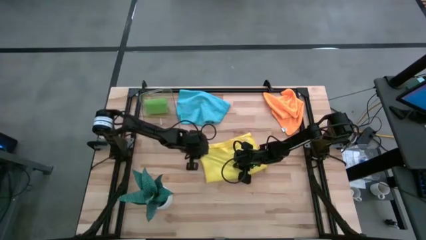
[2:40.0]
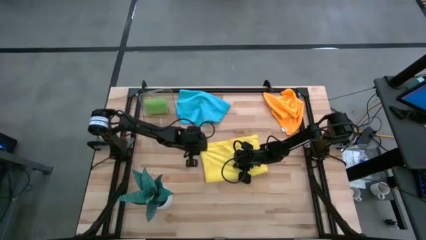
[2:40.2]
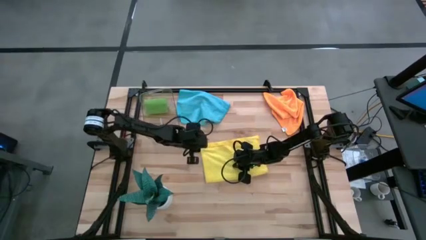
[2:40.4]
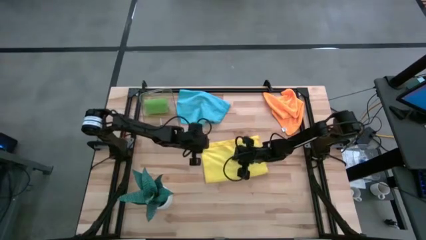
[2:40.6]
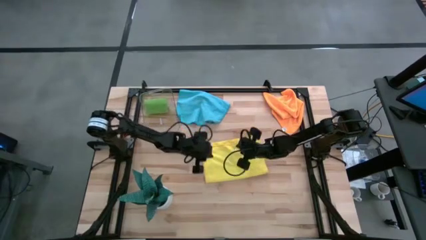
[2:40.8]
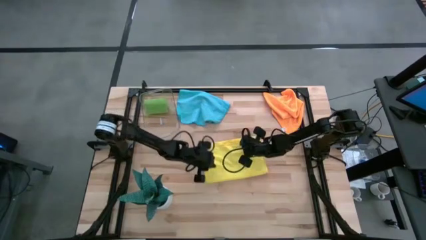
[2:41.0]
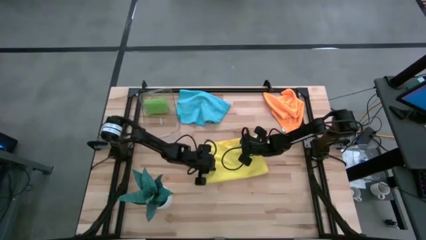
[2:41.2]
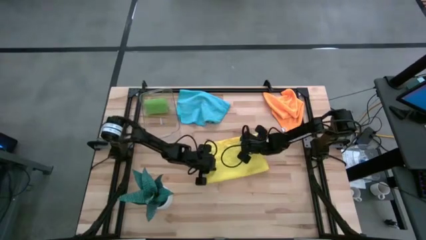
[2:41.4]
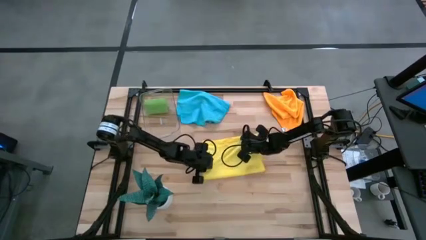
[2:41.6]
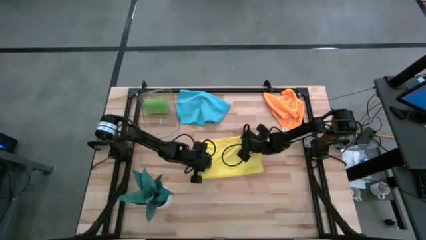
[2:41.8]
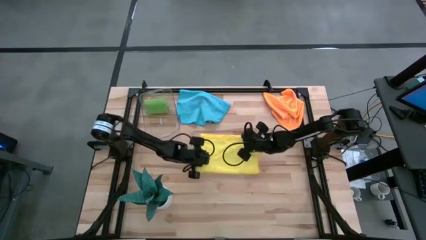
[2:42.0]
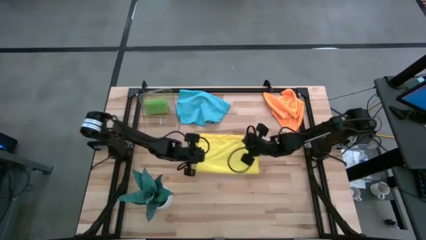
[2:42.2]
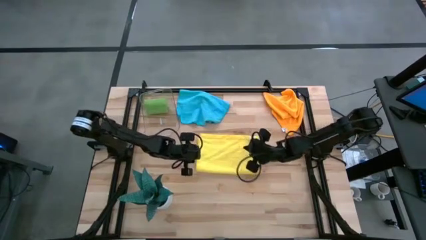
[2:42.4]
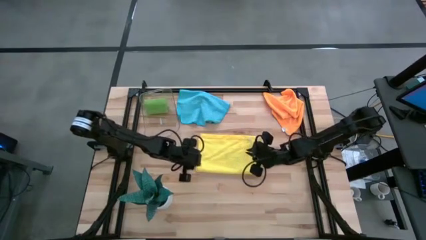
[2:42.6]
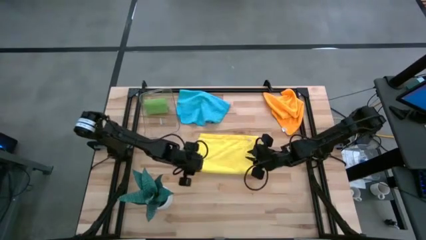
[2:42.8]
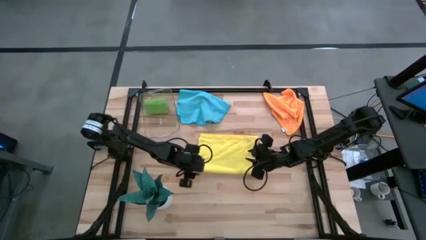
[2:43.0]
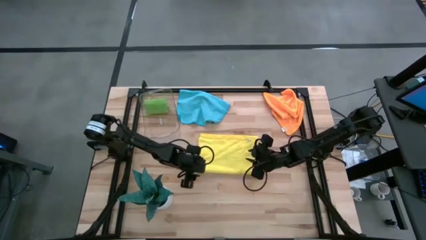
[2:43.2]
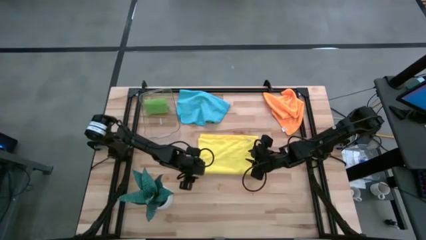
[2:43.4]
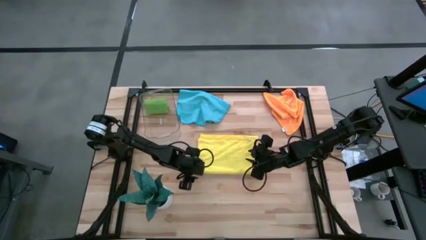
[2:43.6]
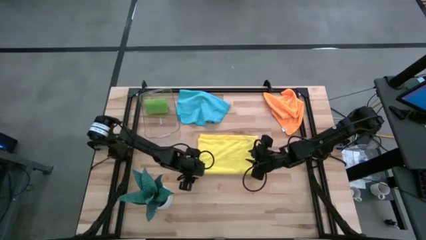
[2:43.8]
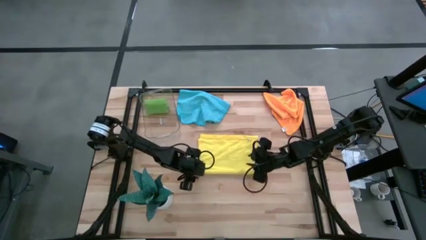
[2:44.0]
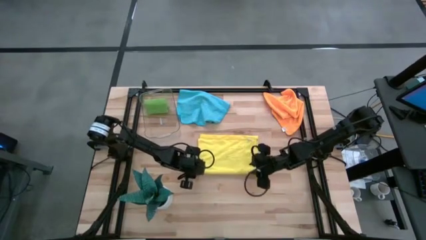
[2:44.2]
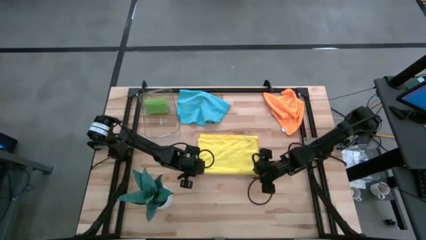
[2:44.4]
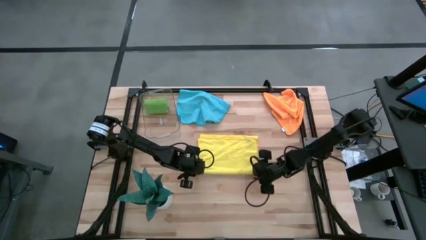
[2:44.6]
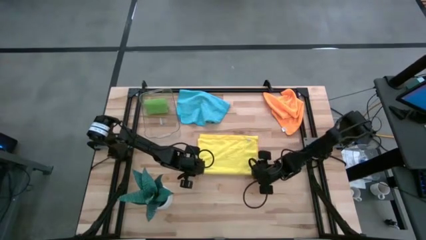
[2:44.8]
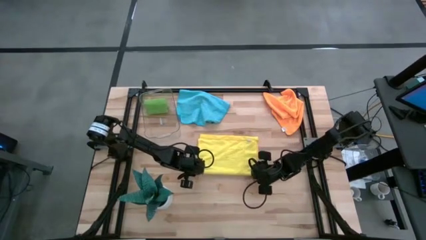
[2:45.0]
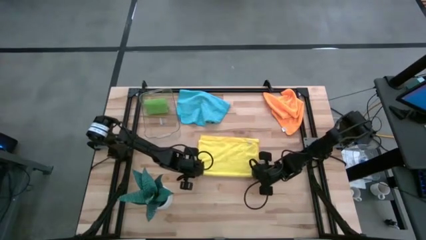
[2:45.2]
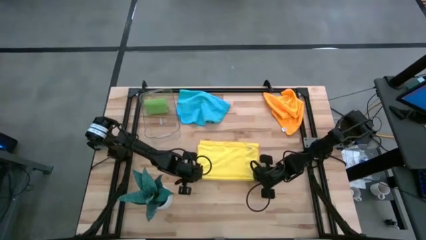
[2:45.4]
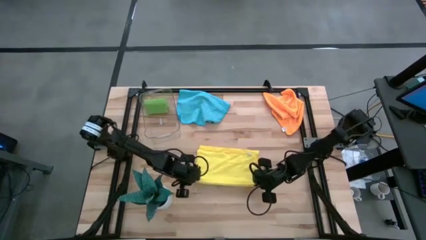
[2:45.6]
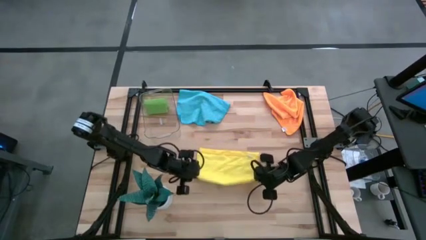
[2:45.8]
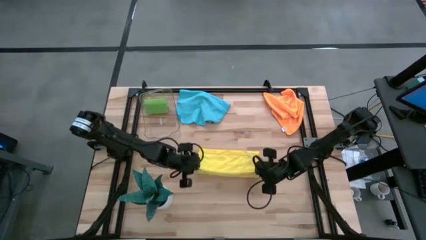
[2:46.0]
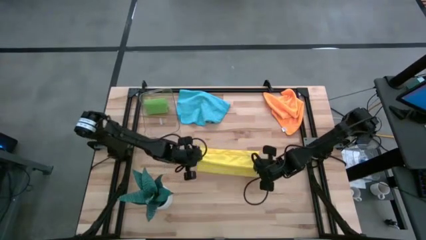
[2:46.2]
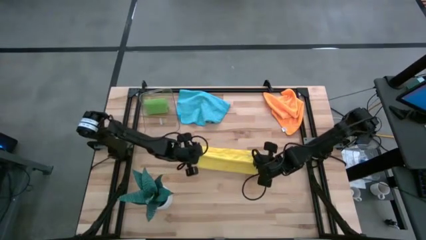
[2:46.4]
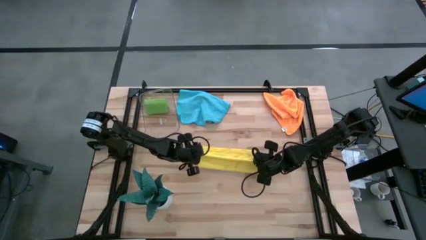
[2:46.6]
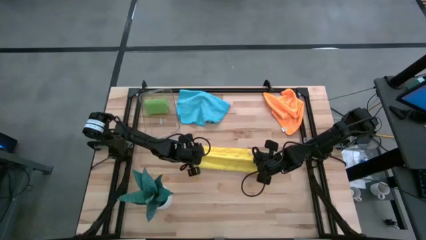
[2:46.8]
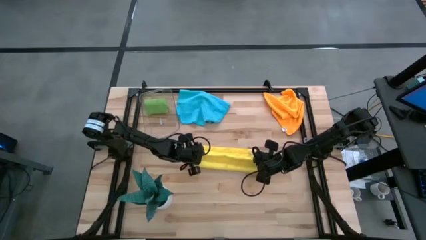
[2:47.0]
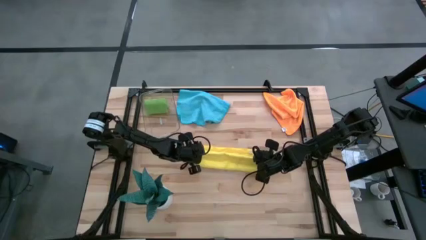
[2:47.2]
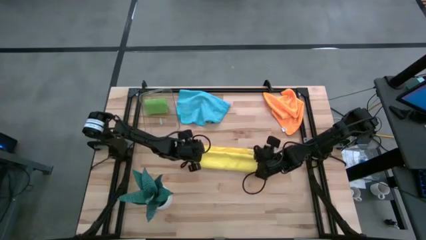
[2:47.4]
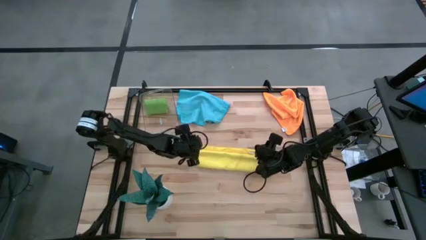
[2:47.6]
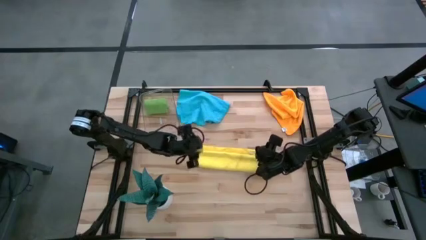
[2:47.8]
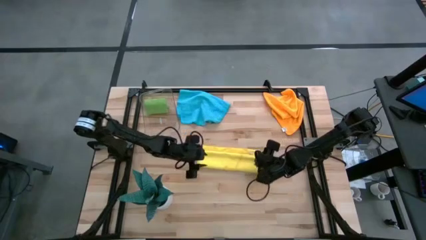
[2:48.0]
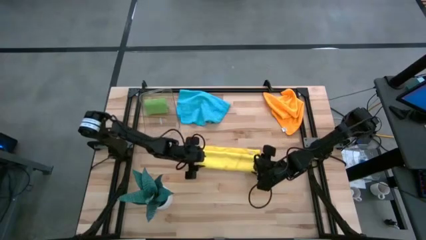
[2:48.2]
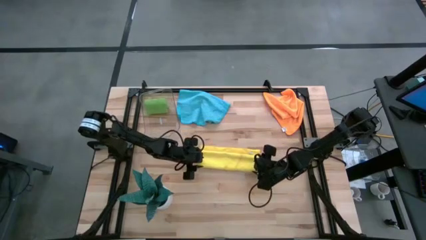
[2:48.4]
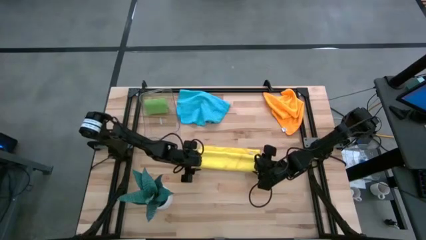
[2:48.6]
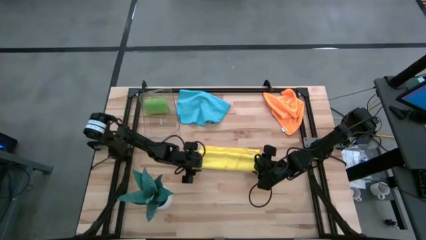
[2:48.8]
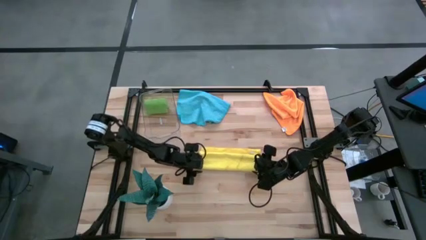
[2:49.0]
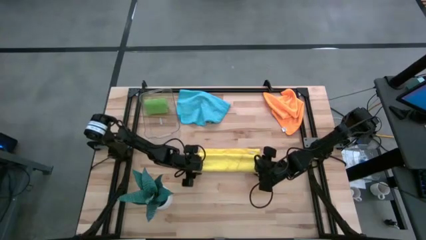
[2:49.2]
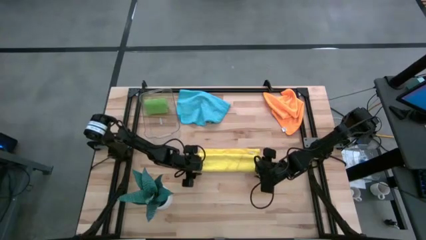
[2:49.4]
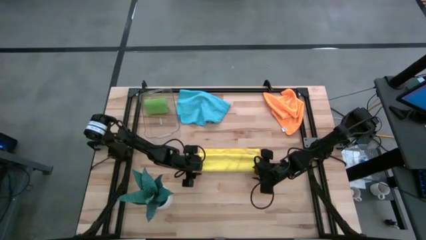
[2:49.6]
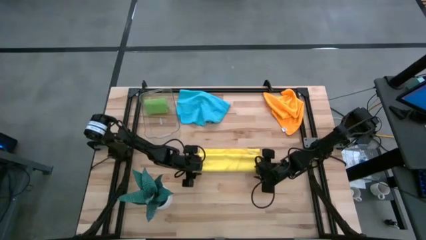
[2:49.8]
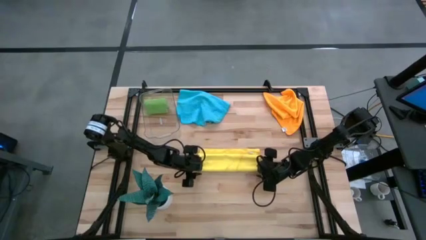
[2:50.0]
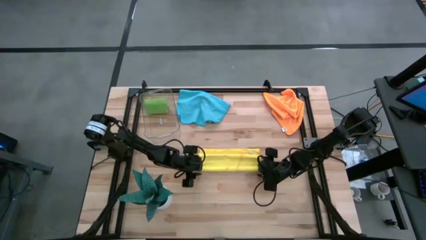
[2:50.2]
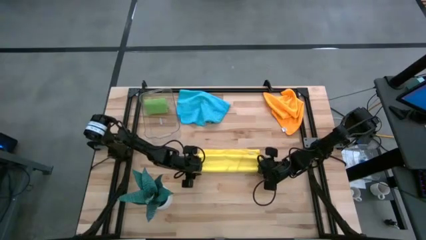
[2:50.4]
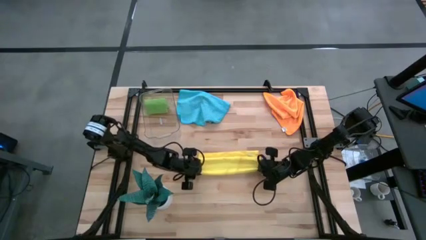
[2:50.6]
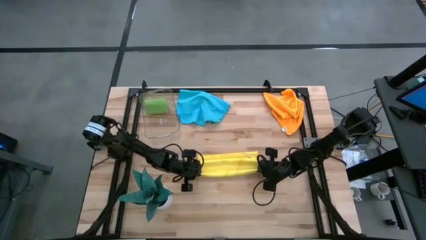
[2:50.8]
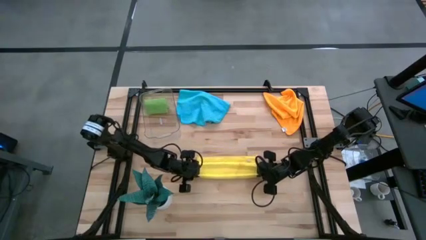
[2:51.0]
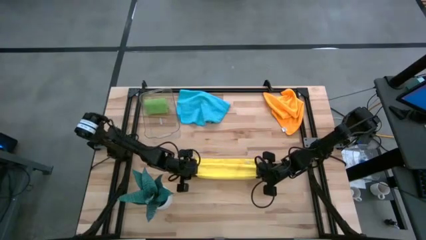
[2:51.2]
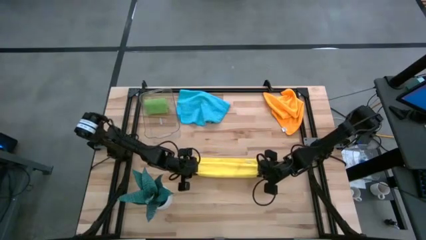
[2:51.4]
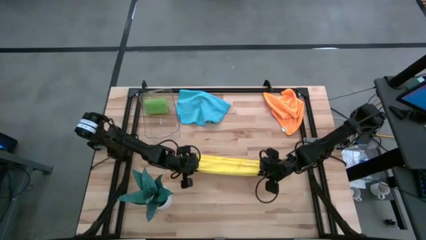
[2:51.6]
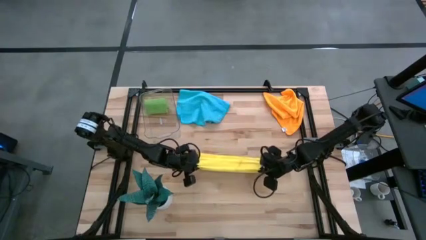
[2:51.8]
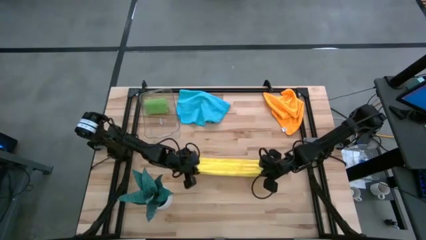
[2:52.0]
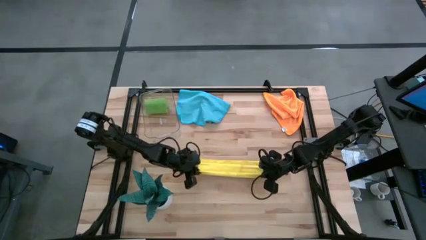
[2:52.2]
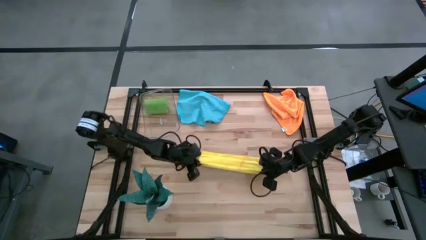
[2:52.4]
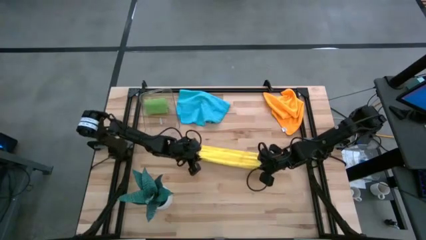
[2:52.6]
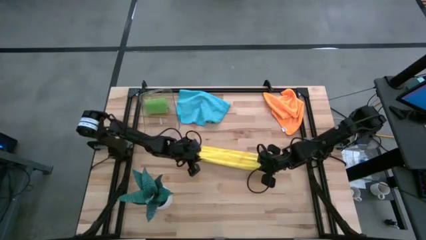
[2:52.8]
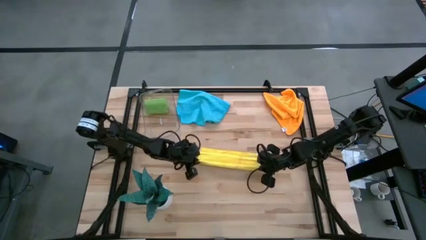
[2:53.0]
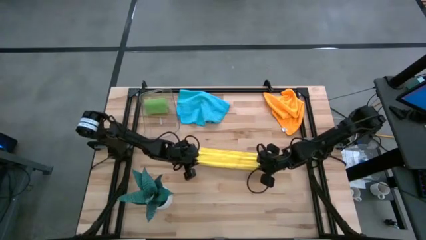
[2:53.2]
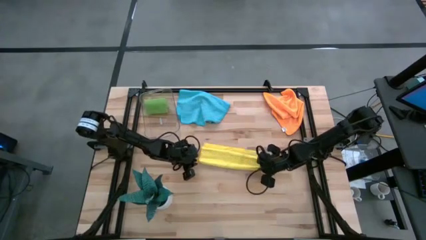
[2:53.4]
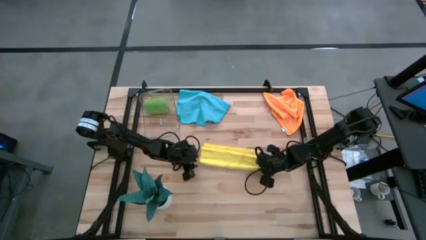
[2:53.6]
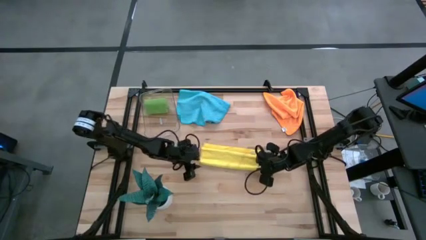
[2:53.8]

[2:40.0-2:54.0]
Task: Roll microfiber towels into tight, uniform cylinder then place into a basket
Fold the yellow microfiber towel

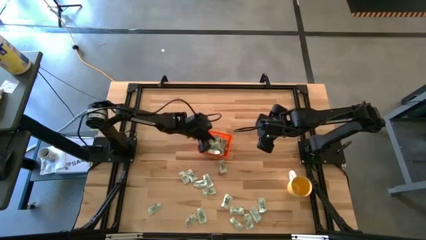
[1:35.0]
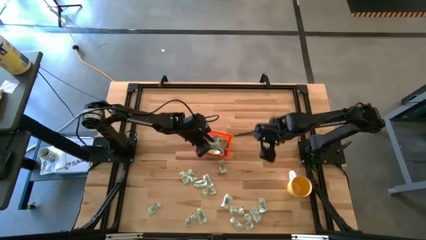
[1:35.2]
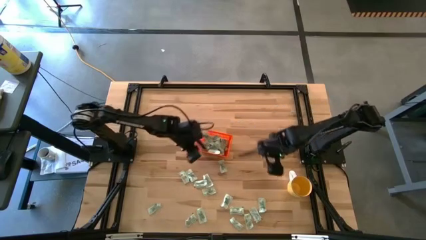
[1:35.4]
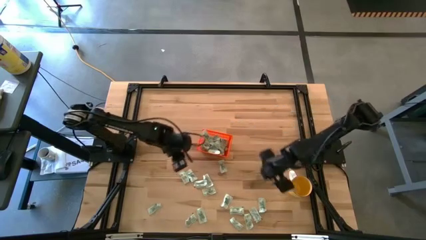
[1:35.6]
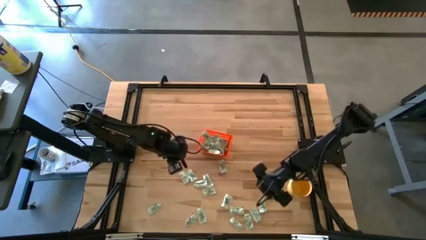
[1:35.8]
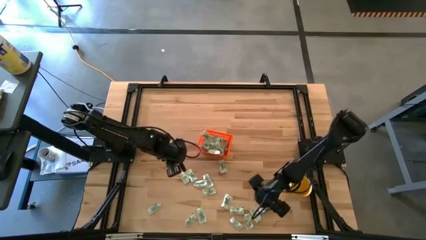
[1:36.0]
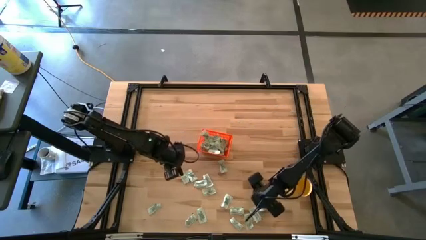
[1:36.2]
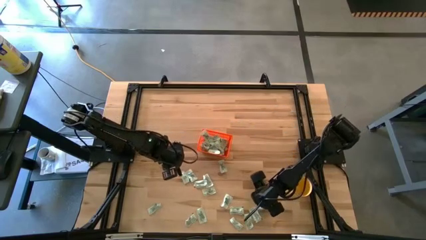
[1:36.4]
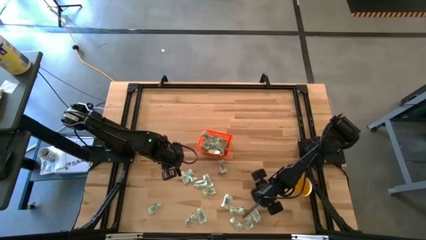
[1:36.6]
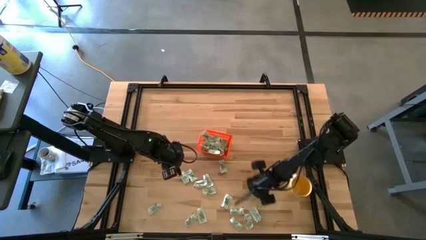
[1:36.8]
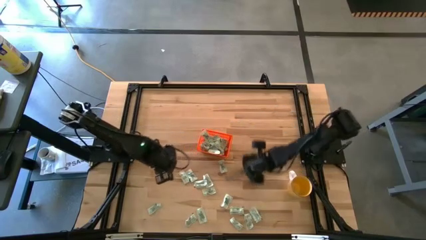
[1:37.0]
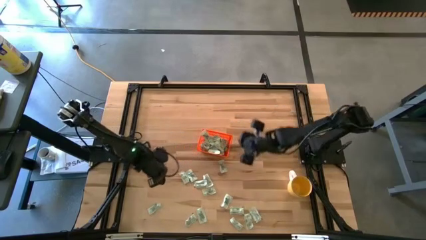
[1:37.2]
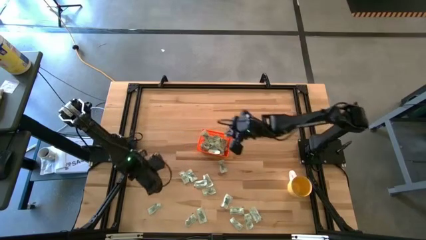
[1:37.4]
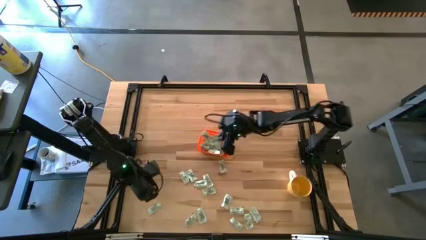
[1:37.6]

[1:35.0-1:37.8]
Task: Pick and place Stevia / Truvia into bins
Put the light green stevia packet into the orange bin

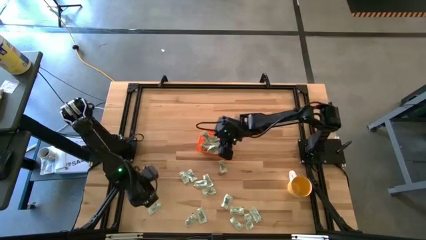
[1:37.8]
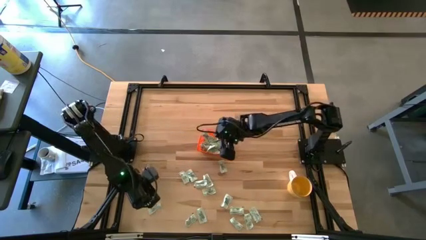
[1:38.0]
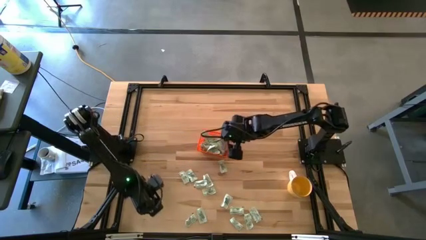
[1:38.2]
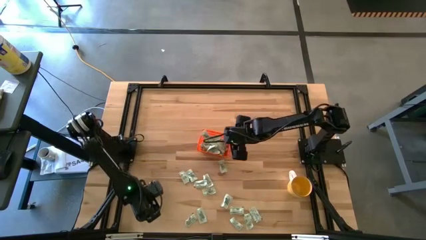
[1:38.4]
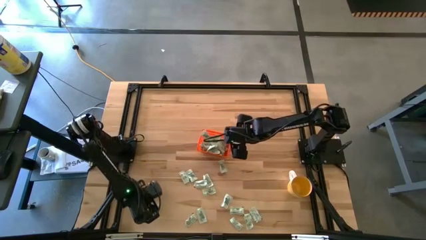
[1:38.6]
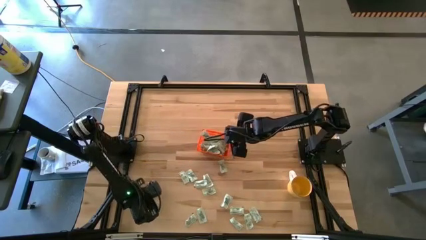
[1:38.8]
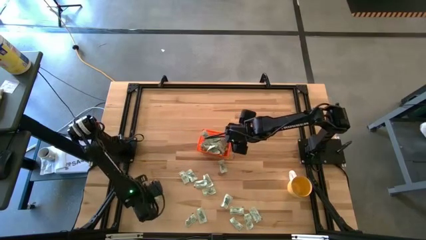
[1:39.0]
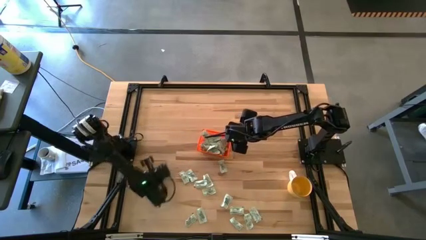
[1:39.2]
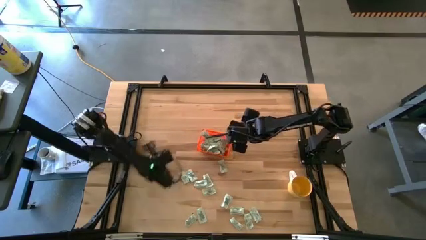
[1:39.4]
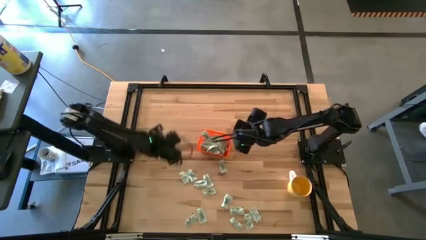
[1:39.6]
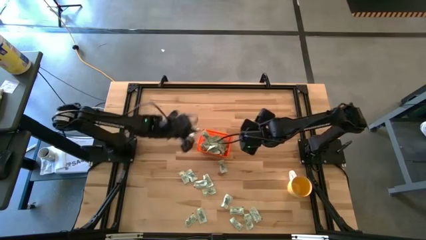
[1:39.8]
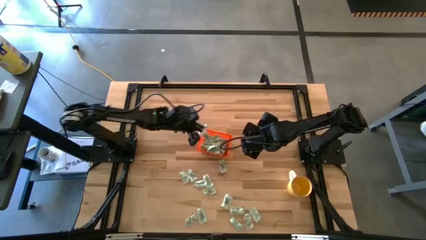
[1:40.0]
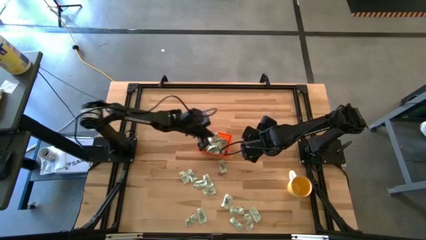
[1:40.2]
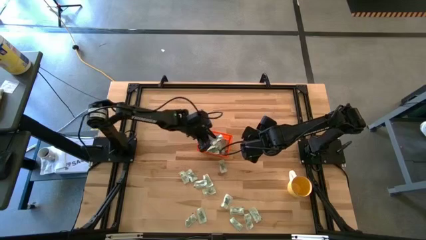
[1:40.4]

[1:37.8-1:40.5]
Put the light green stevia packet into the orange bin
